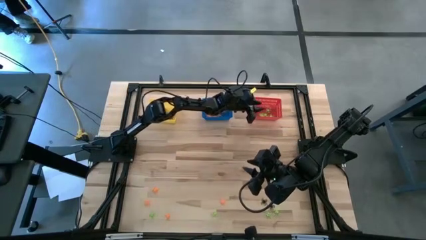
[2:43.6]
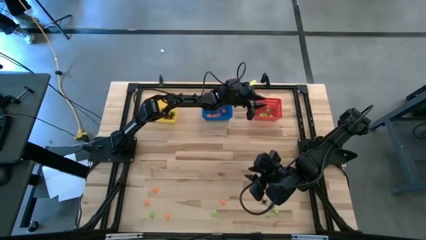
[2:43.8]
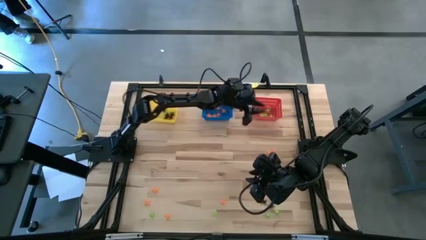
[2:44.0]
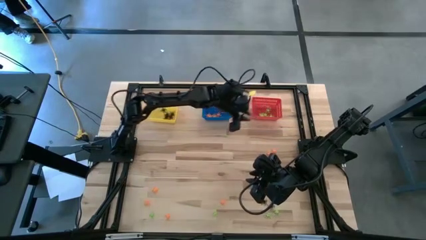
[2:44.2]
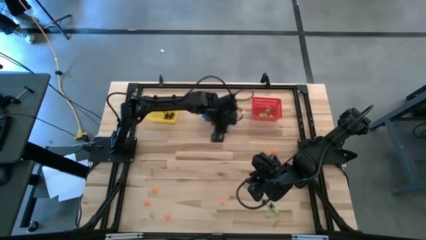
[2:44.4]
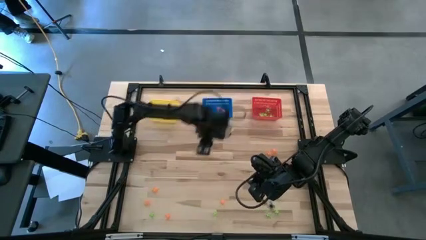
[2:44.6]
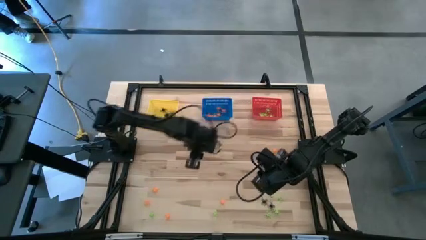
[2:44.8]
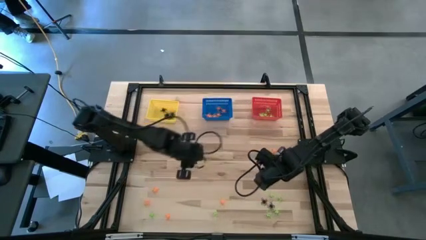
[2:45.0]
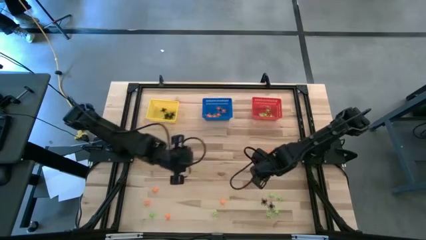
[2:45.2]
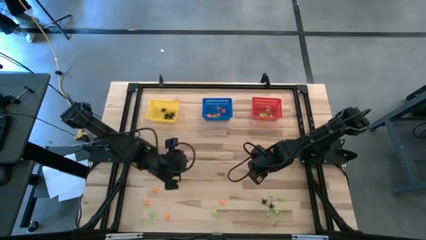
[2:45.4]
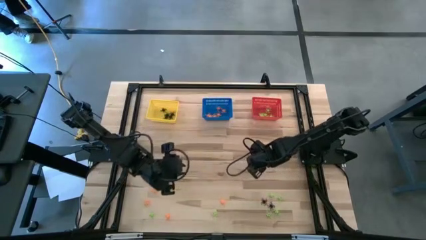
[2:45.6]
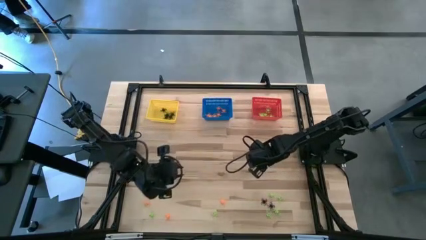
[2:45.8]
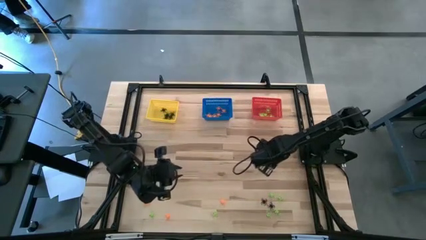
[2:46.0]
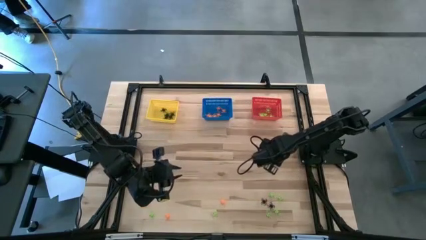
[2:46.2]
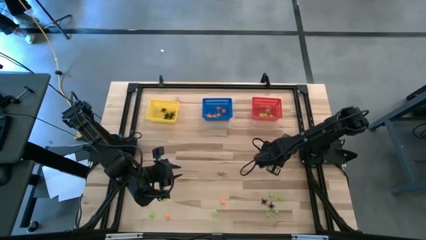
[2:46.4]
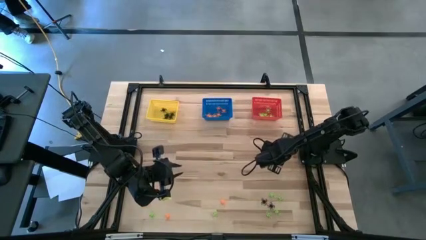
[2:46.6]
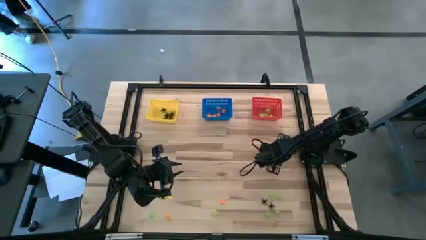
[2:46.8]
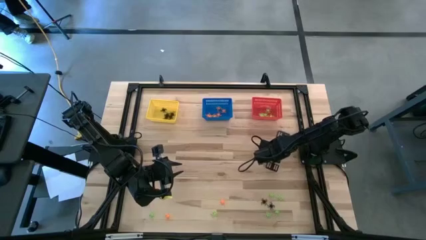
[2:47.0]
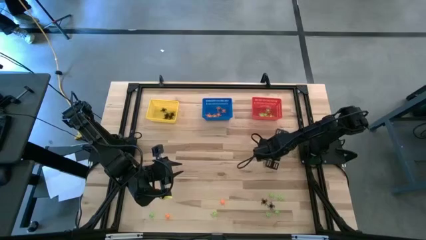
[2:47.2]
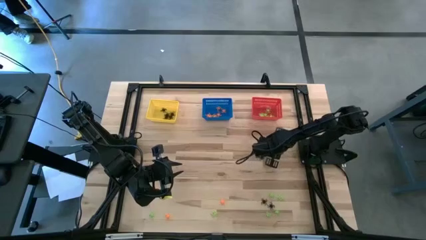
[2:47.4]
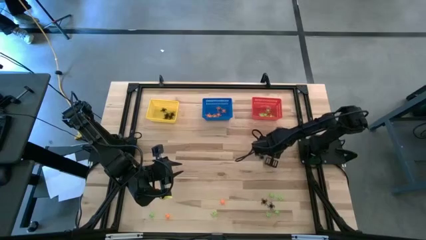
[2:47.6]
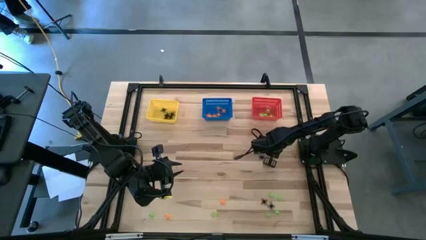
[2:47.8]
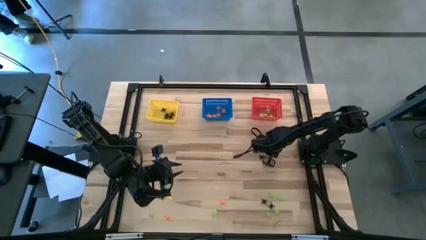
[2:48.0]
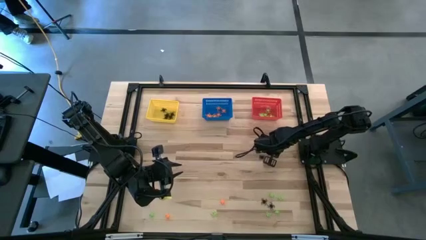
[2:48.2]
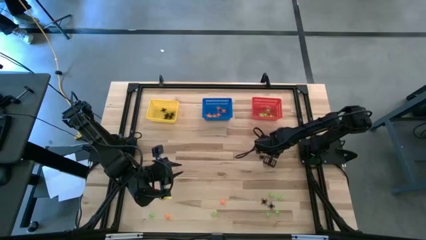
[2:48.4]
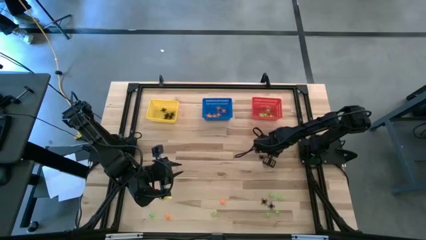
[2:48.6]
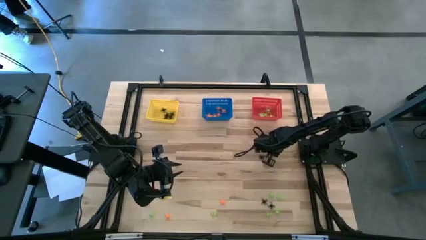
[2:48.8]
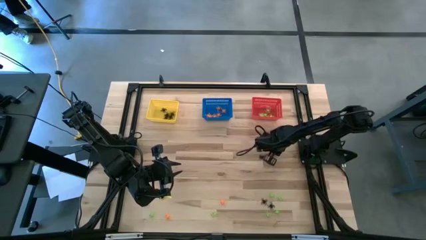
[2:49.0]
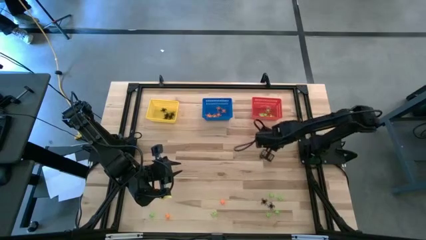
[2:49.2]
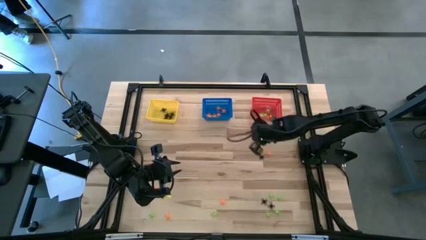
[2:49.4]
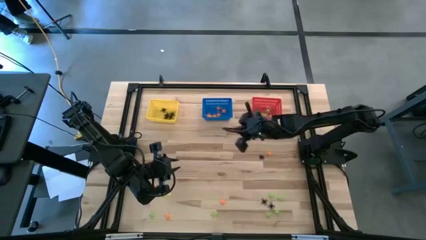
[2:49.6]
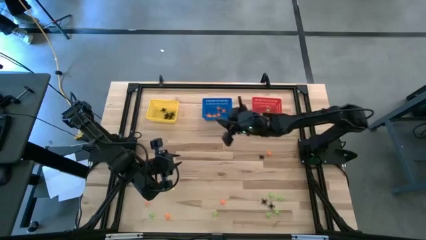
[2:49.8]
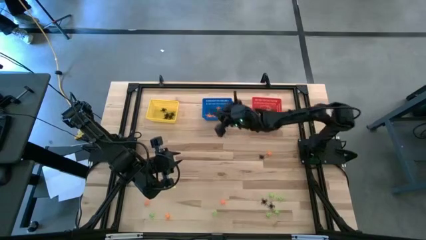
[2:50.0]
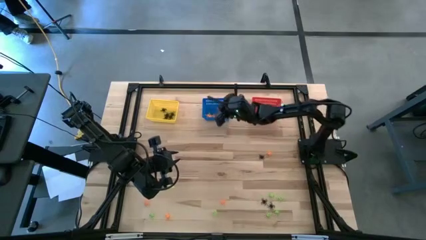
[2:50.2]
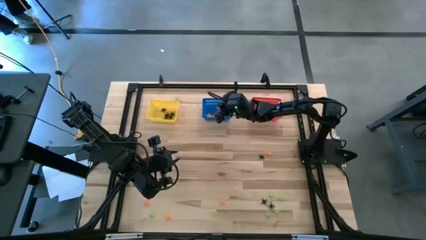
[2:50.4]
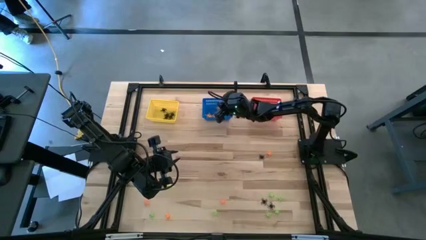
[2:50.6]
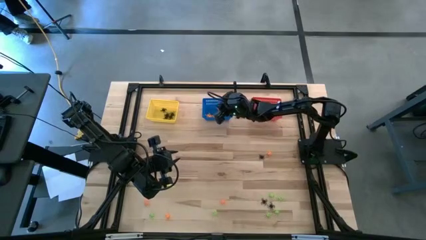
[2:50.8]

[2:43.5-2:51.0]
Task: Sort Halloween decoration
Put the orange spider toy into the blue basket

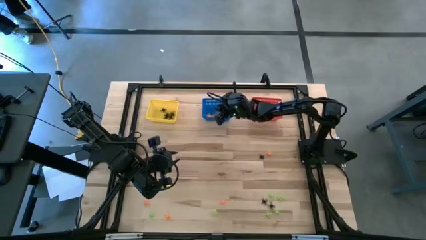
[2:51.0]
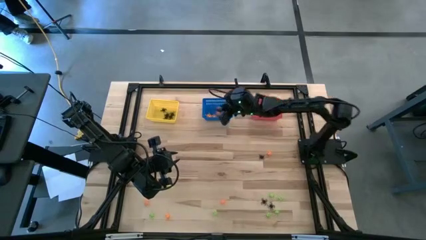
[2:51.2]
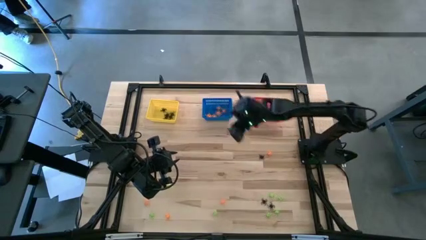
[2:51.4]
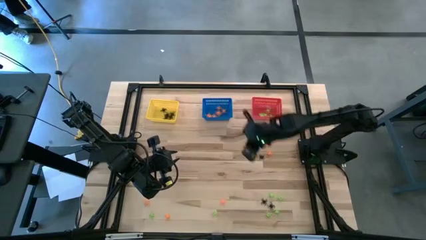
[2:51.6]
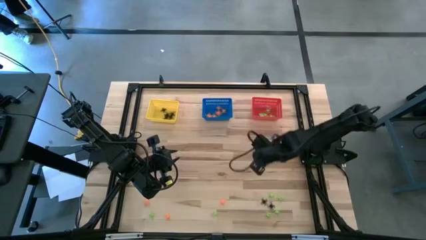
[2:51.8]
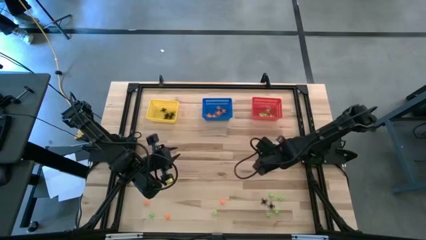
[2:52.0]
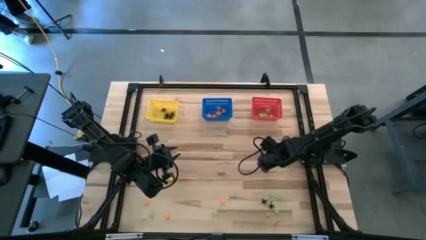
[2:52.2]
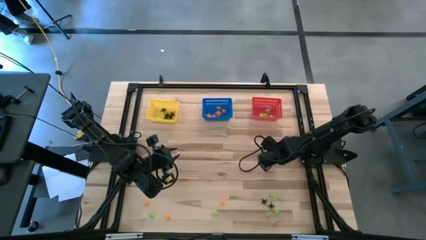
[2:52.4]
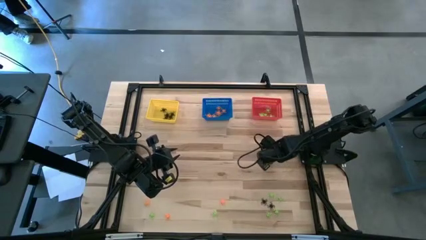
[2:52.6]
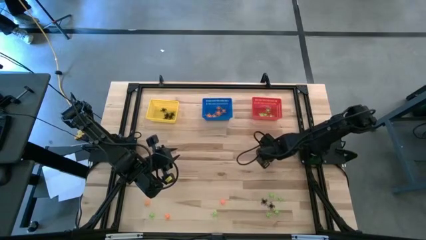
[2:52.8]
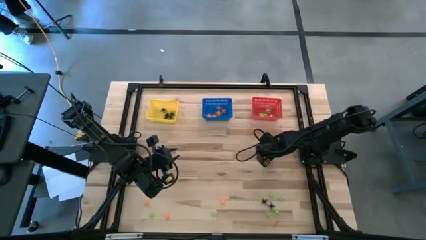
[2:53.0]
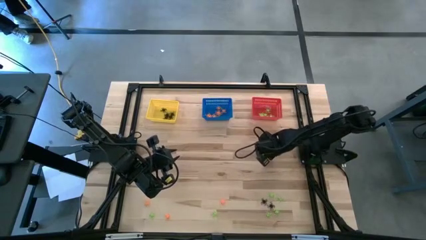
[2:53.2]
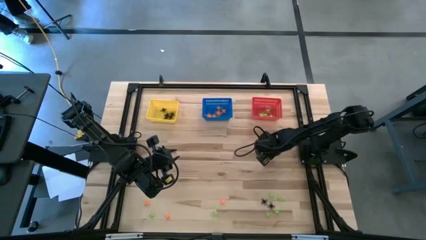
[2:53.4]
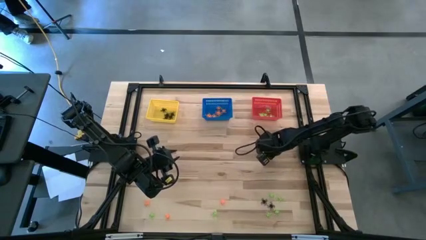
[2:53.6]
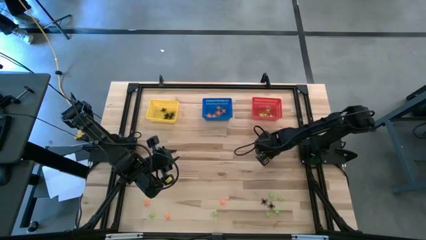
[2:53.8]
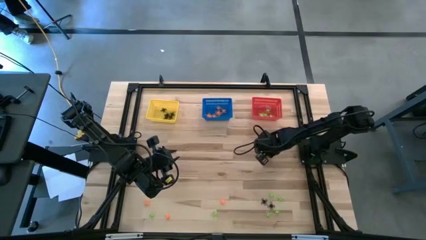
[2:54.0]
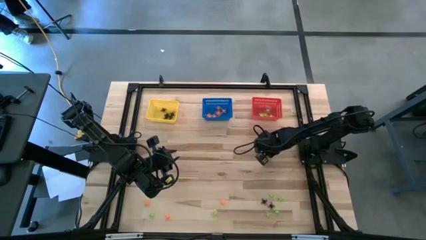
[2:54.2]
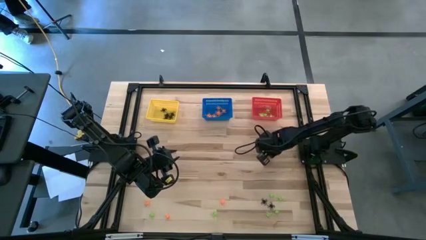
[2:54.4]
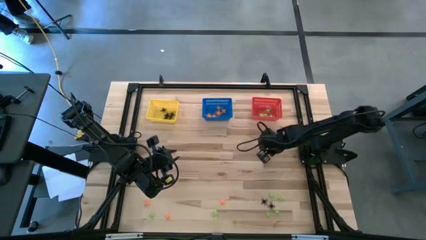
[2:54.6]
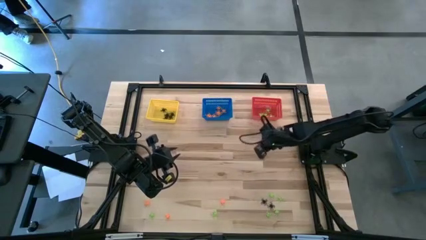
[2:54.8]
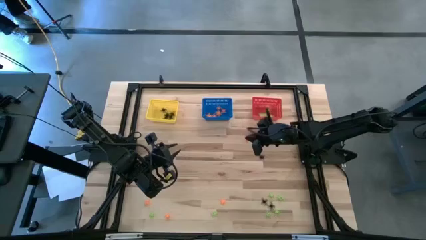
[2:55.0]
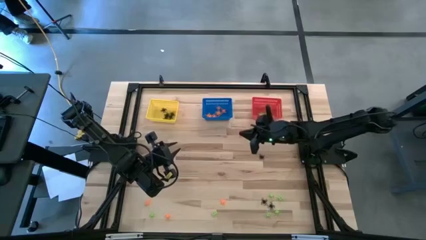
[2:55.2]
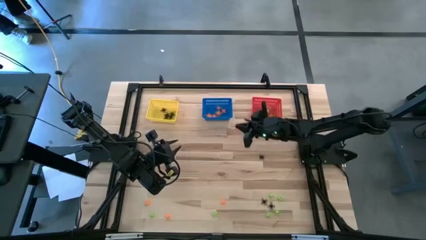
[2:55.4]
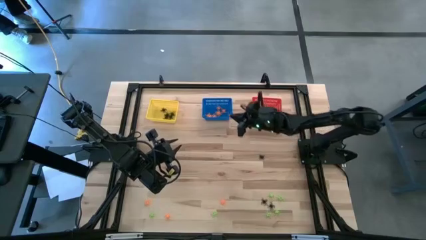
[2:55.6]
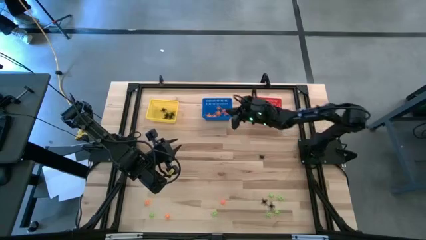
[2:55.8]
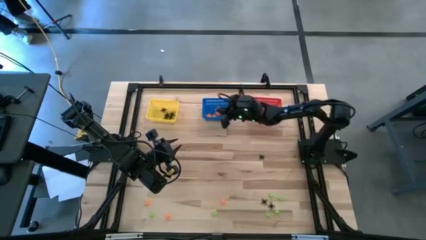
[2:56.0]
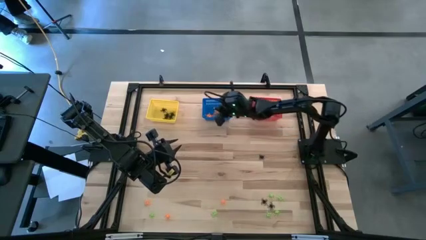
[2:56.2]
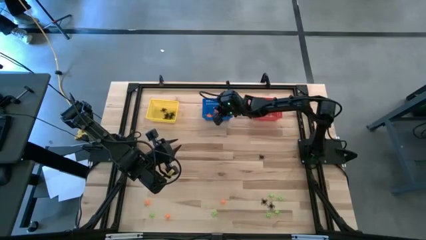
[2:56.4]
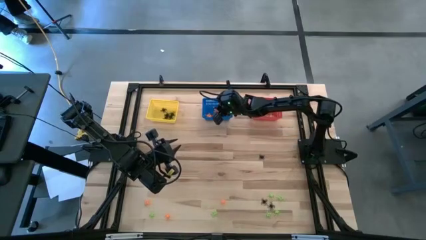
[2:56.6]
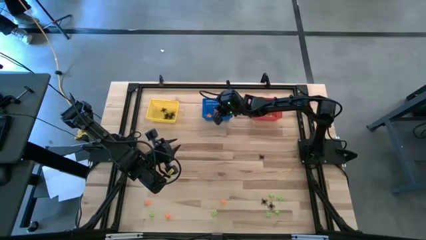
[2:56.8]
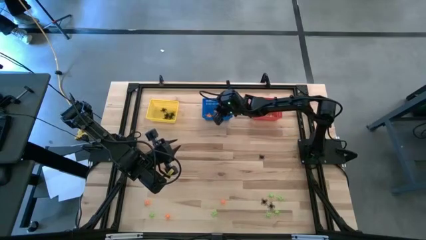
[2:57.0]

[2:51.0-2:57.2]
Put the orange spider toy into the blue basket
